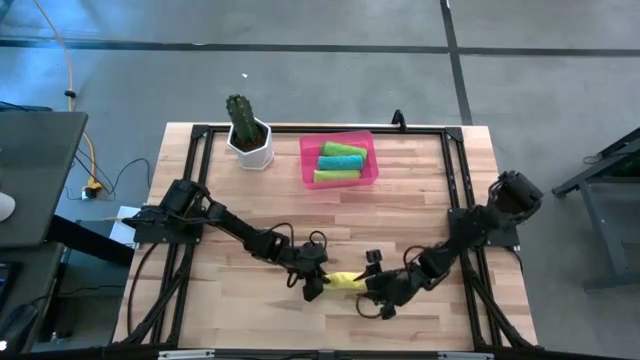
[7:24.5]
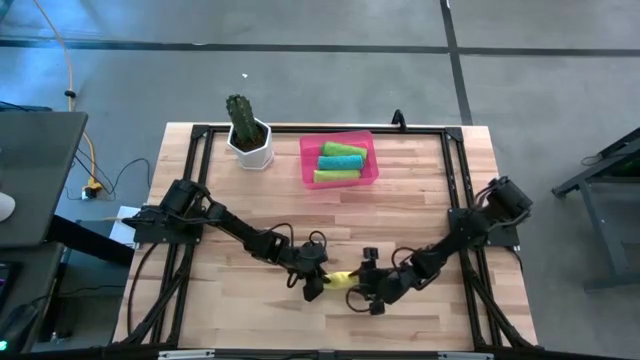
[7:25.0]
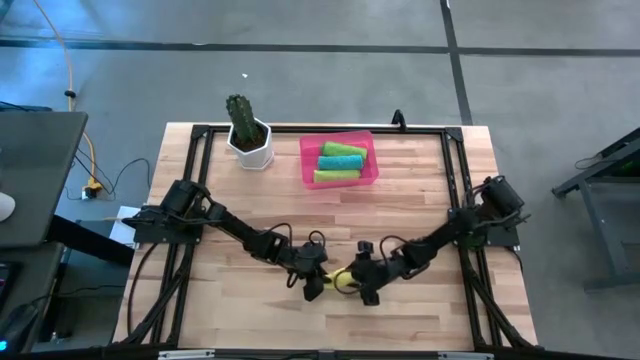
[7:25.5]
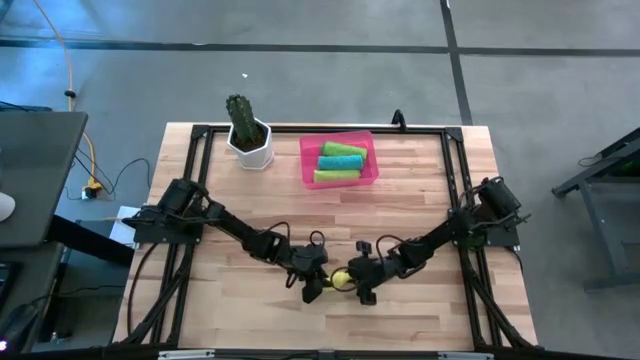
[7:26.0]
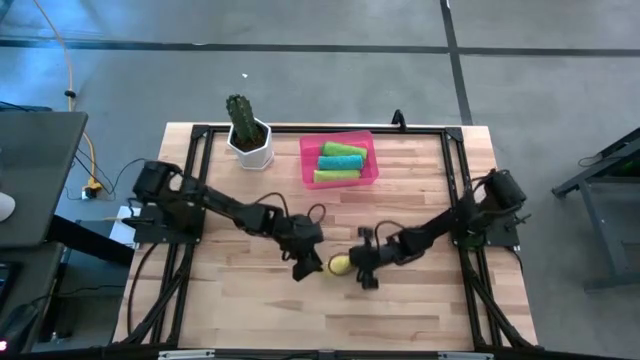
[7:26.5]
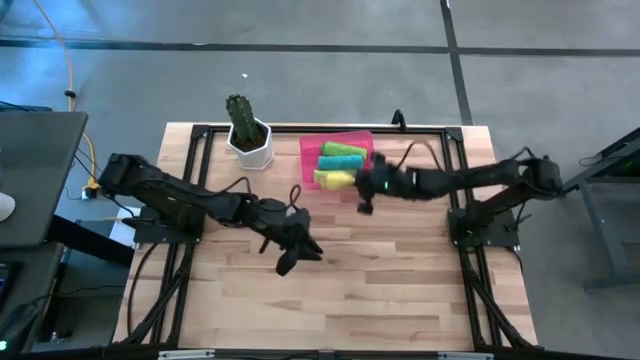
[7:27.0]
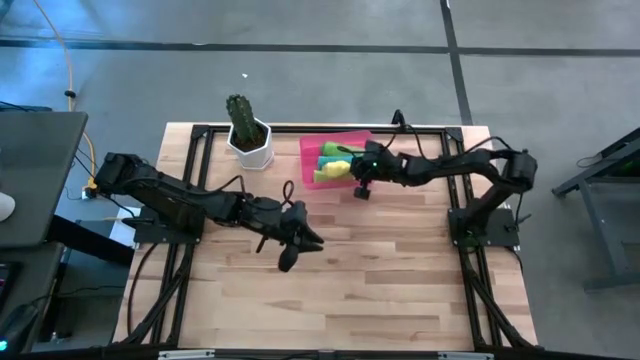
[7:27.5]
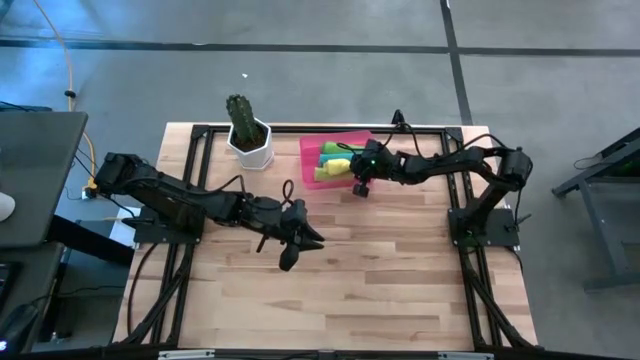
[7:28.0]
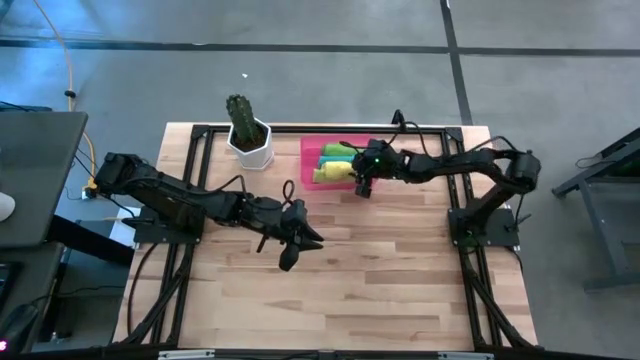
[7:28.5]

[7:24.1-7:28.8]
Task: Roll microfiber towels into tight, uniform cylinder then place into a basket
Put the rolled yellow microfiber cloth into the pink bin

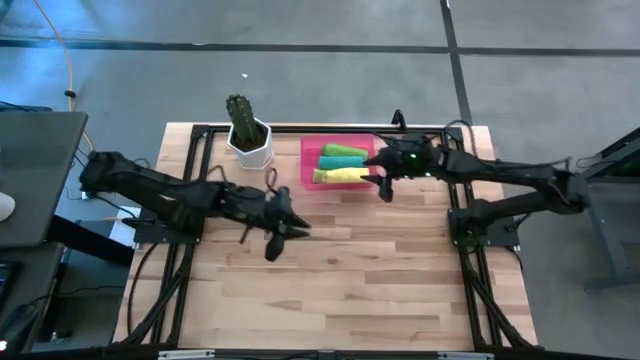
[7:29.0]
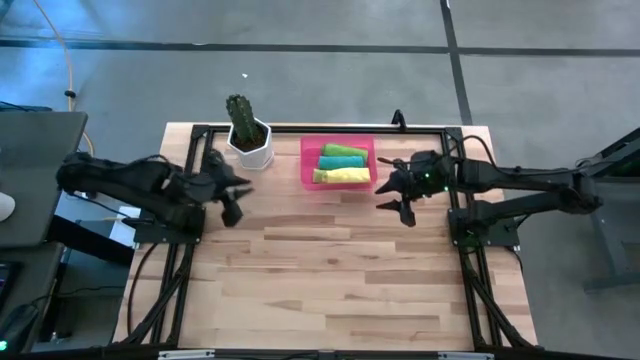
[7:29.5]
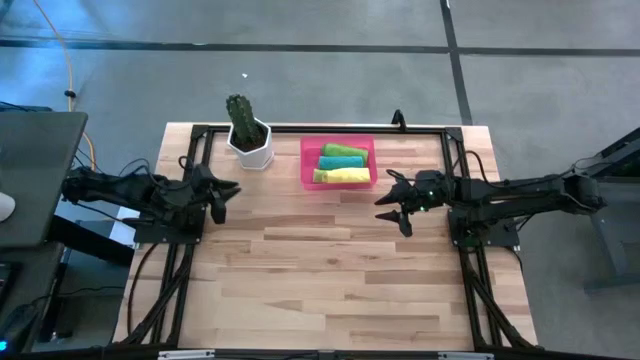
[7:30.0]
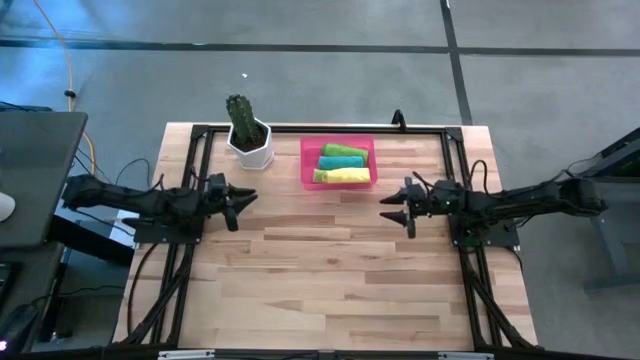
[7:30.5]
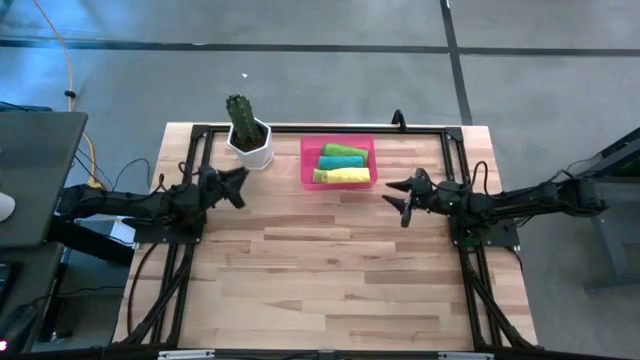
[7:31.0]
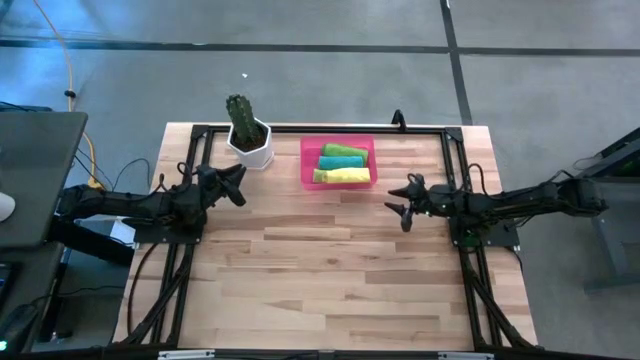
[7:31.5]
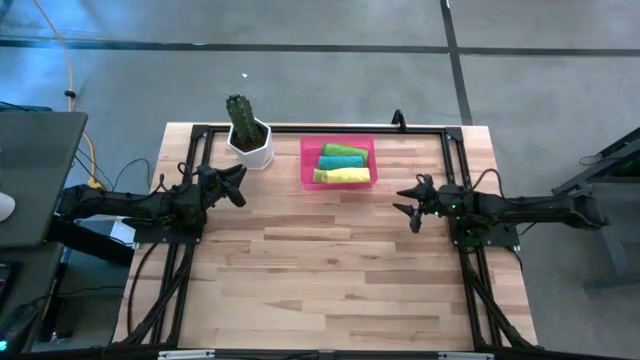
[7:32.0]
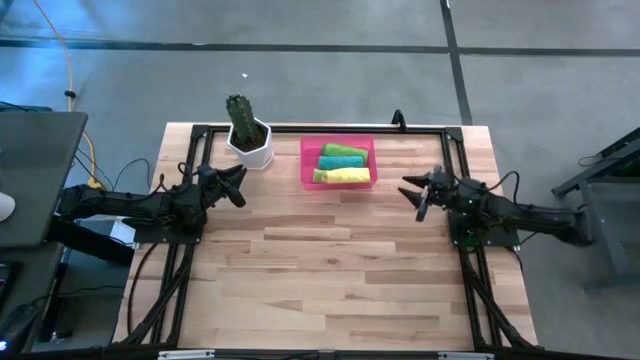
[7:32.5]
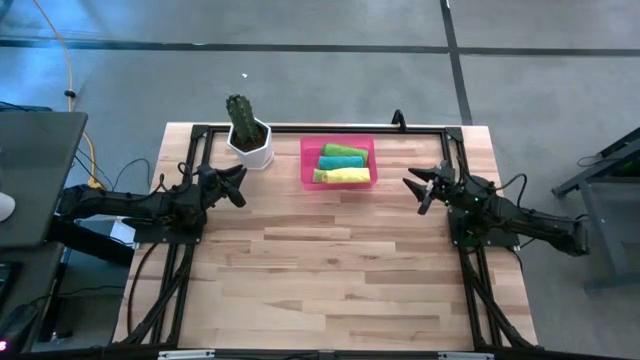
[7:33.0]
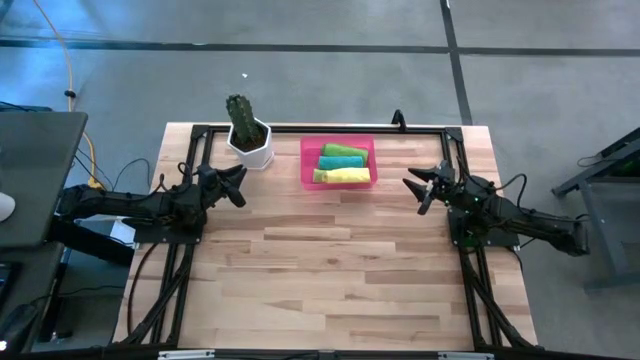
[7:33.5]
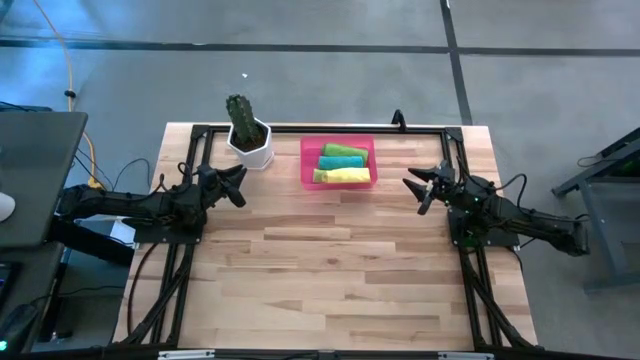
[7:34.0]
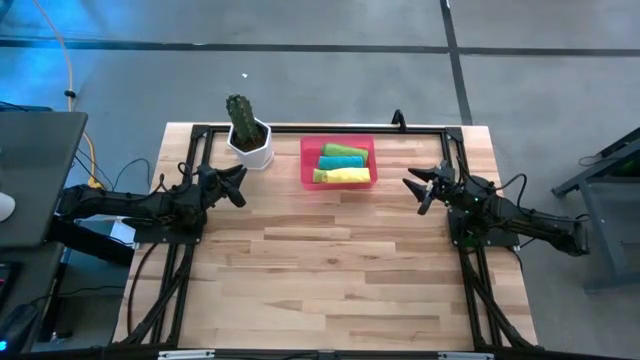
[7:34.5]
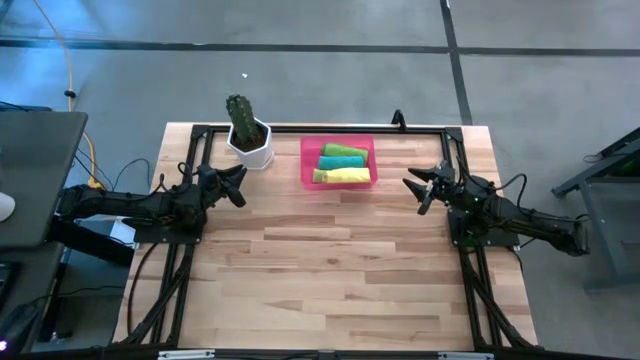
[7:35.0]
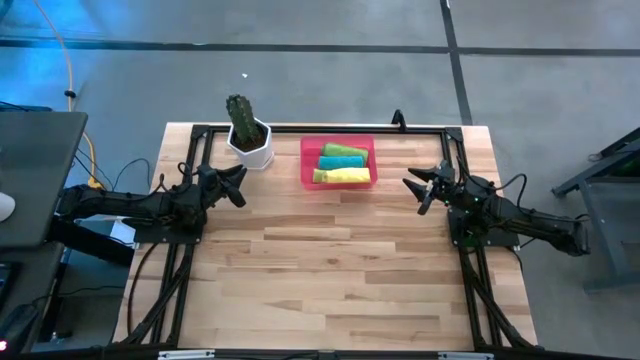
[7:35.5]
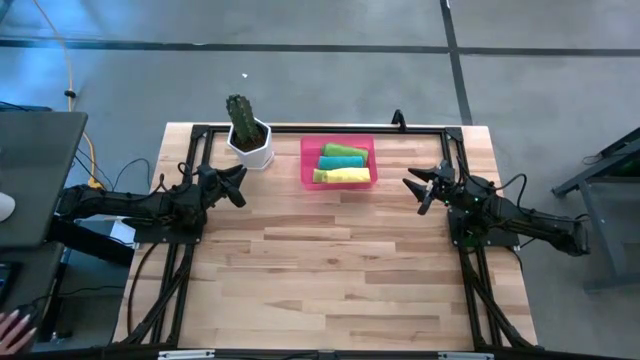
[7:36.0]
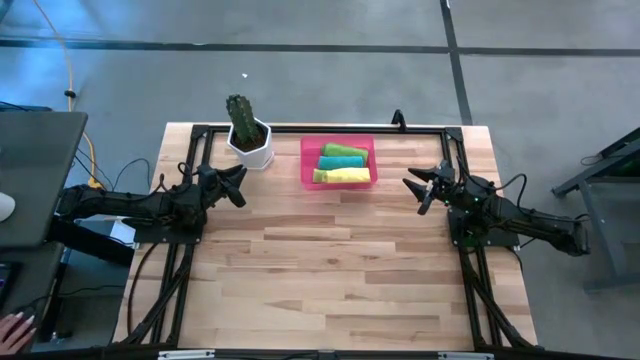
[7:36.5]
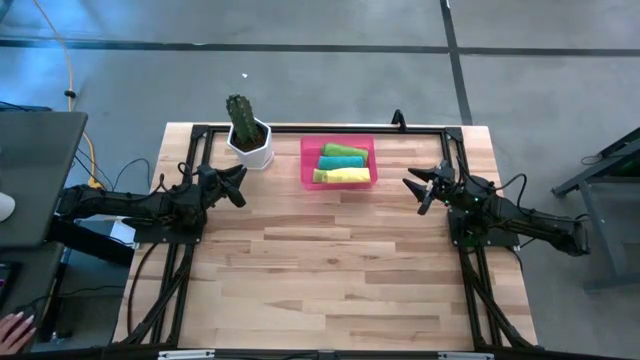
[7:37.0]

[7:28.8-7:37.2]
Return to Home Position

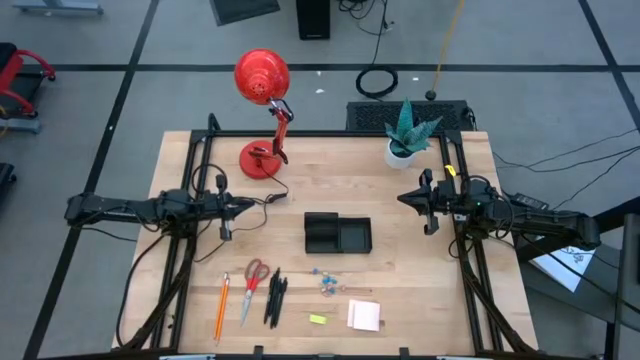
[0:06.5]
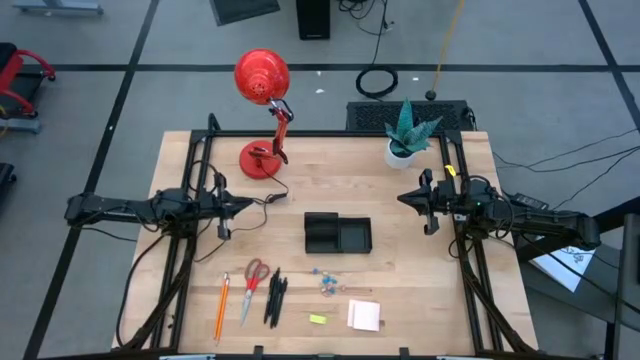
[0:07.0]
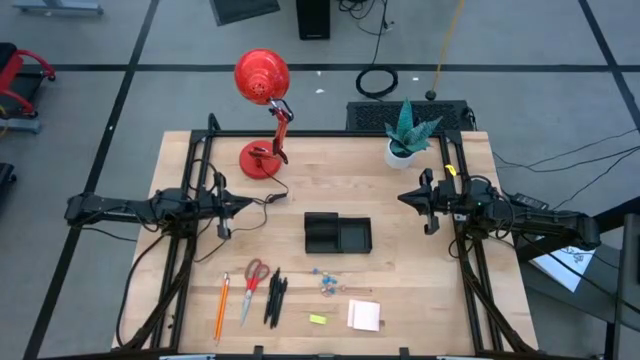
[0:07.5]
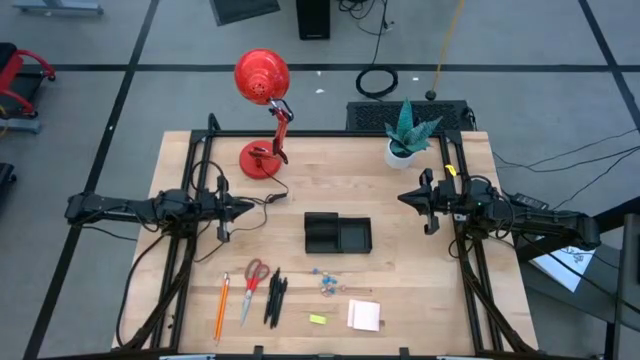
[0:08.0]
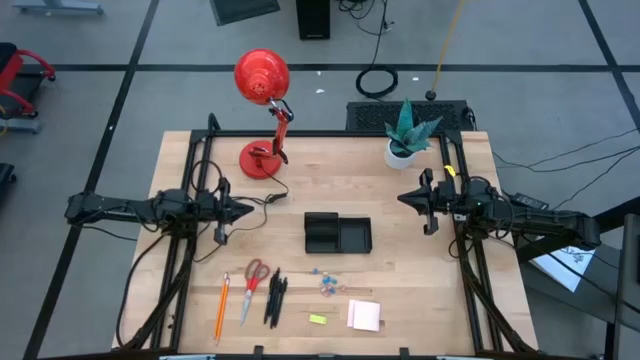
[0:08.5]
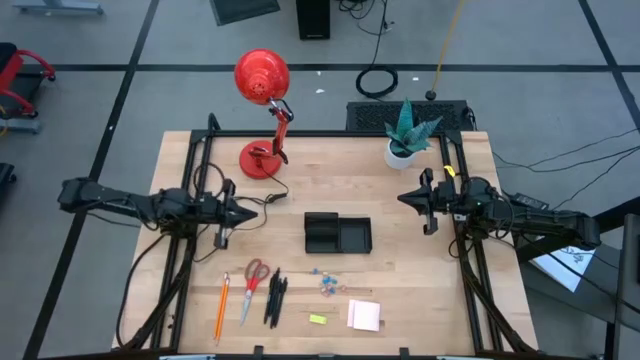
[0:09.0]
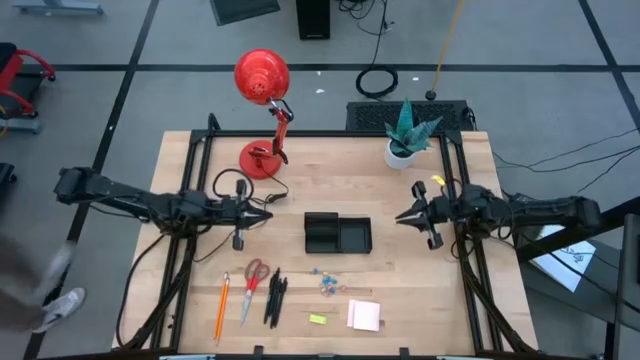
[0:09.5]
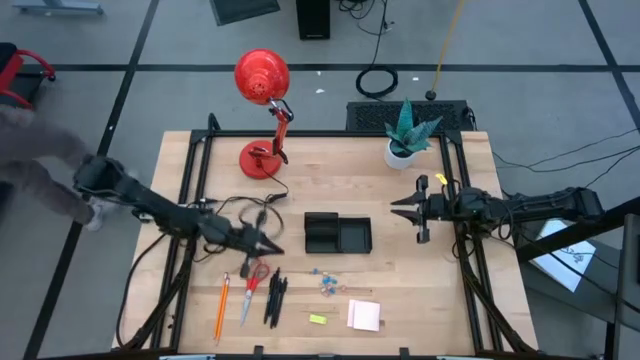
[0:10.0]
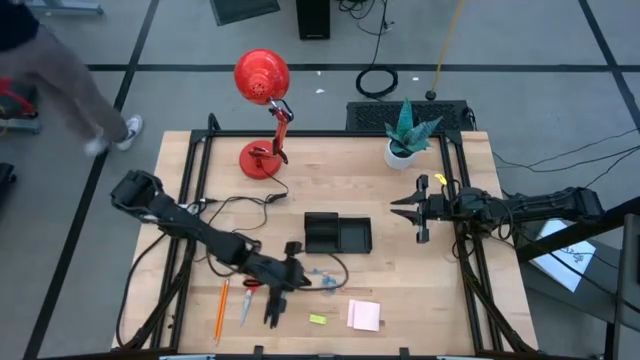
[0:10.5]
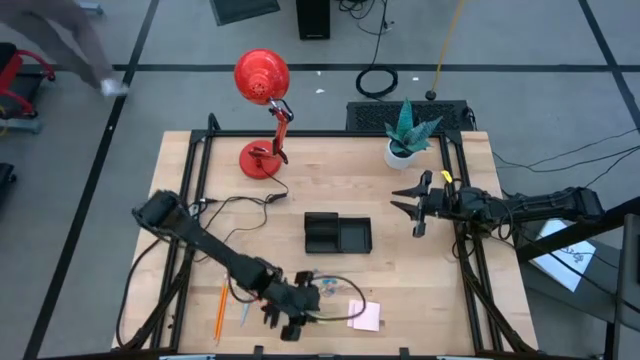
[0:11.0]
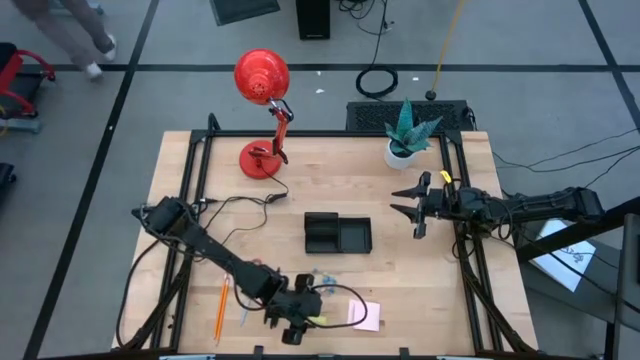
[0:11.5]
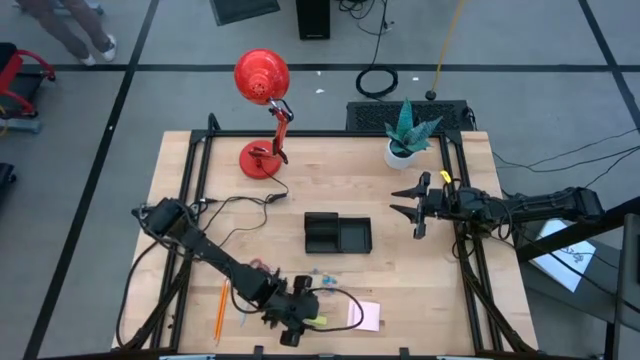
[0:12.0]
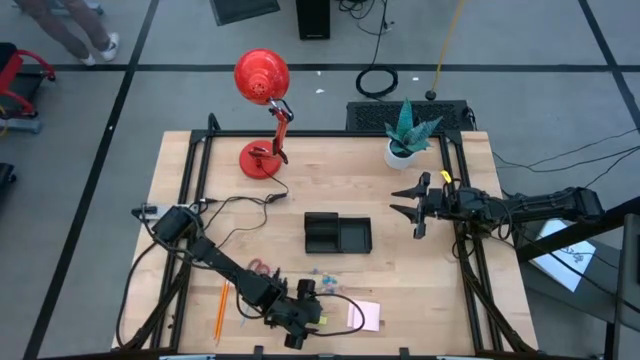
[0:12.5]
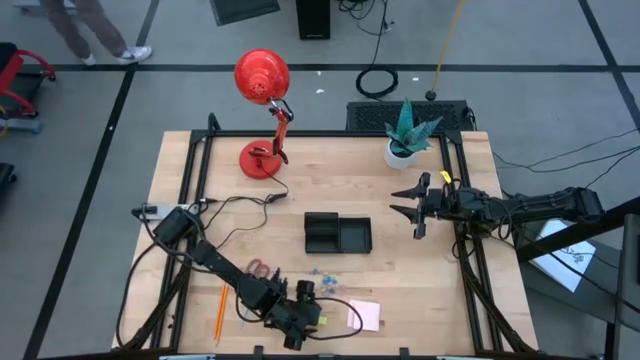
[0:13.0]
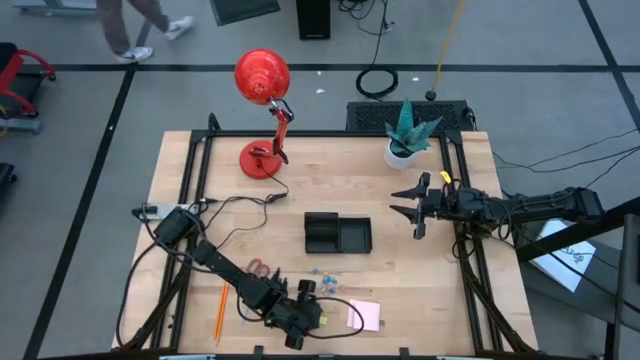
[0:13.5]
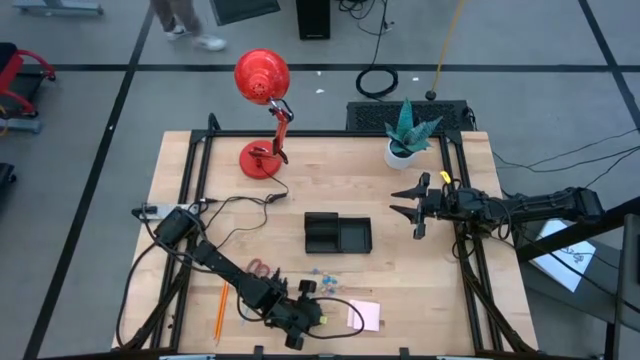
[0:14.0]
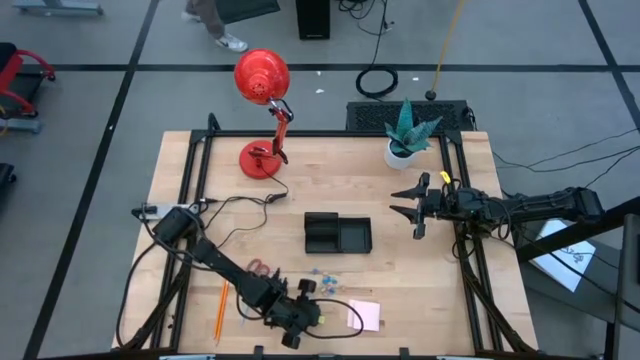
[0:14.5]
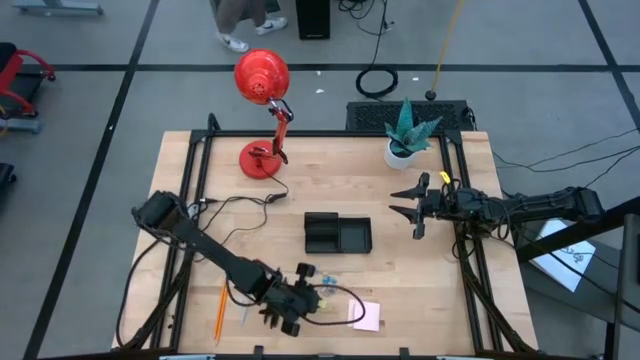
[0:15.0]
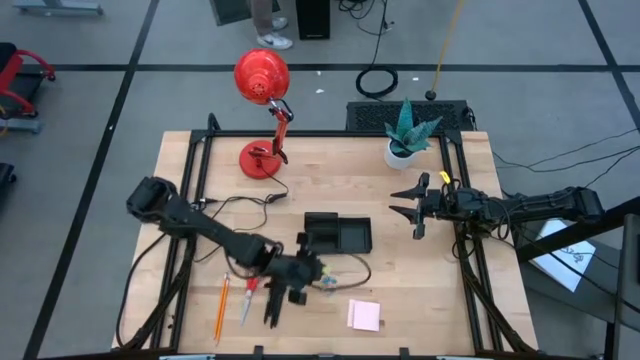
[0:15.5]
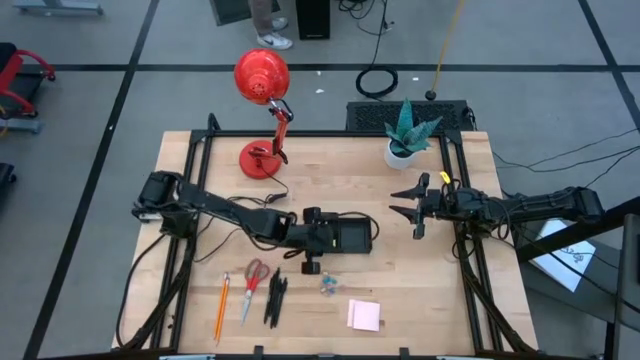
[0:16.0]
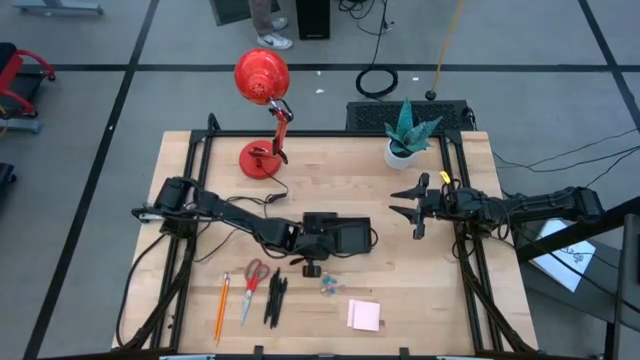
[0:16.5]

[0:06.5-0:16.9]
Task: Pick and place office supplies into organizer
Put the yellow eraser into the black desk organizer
